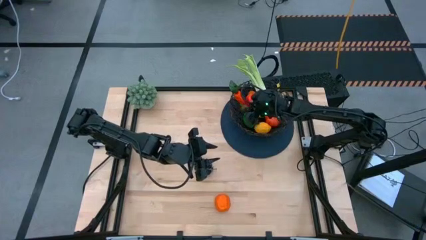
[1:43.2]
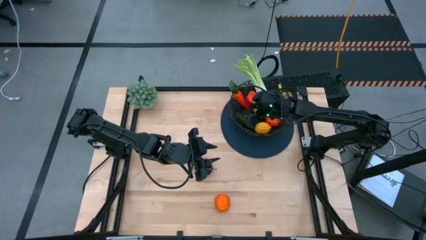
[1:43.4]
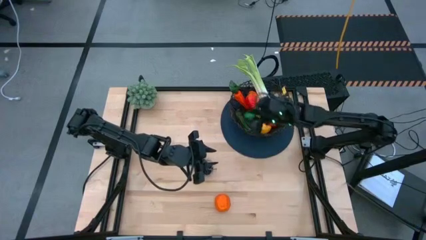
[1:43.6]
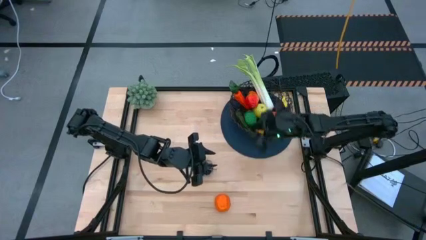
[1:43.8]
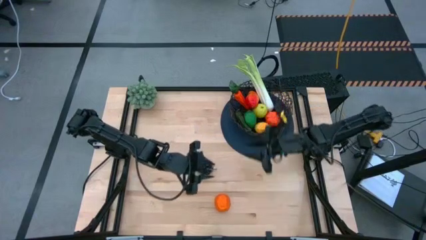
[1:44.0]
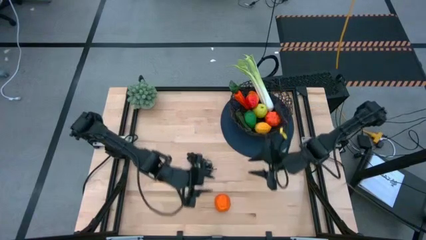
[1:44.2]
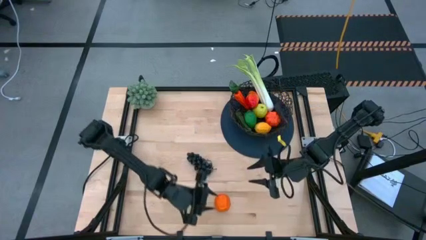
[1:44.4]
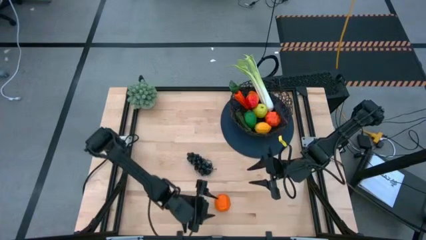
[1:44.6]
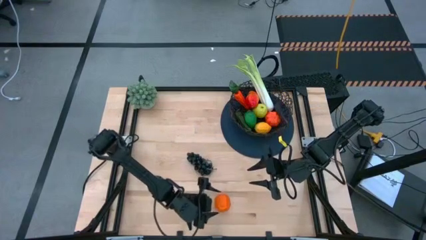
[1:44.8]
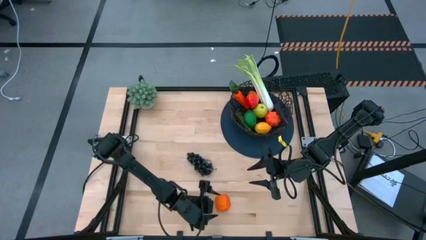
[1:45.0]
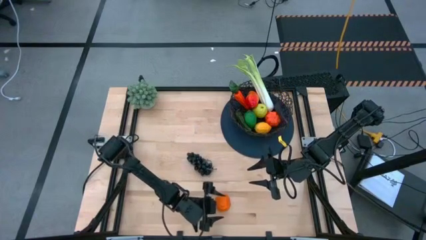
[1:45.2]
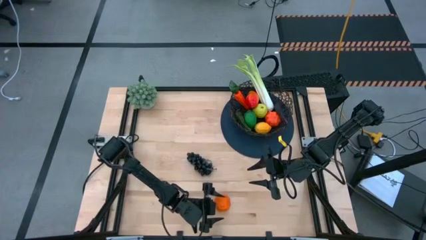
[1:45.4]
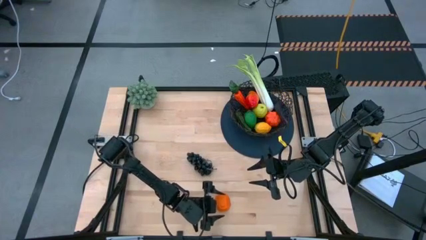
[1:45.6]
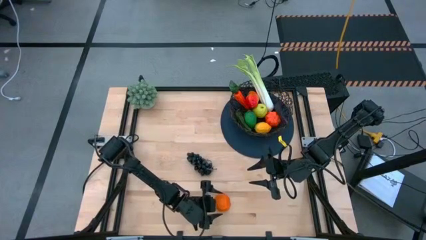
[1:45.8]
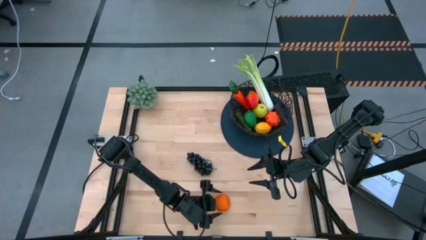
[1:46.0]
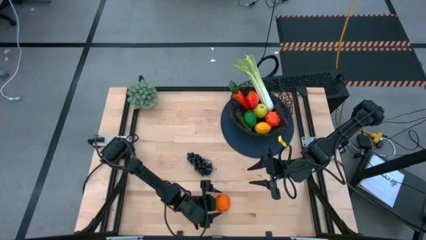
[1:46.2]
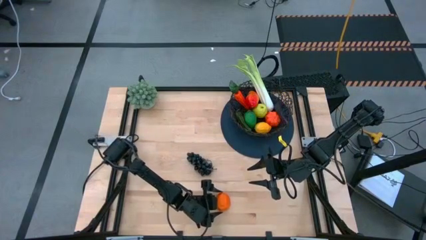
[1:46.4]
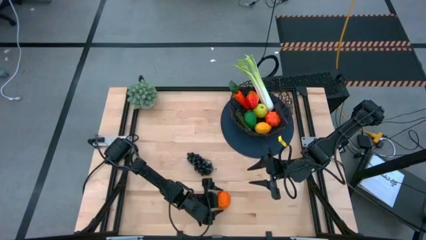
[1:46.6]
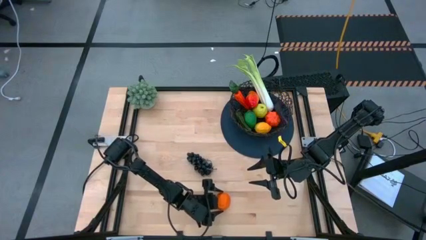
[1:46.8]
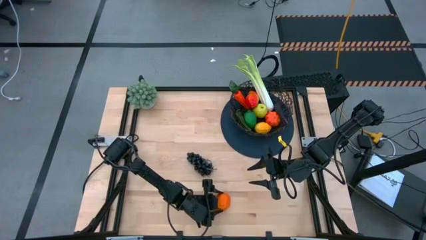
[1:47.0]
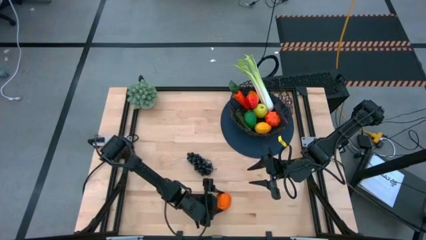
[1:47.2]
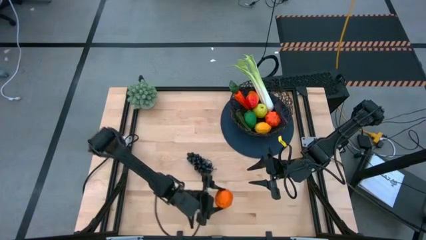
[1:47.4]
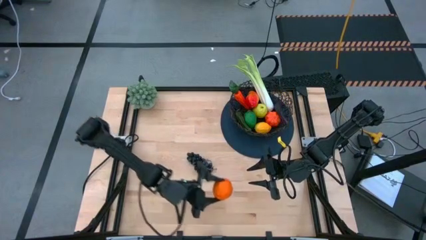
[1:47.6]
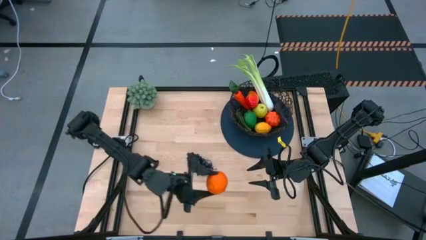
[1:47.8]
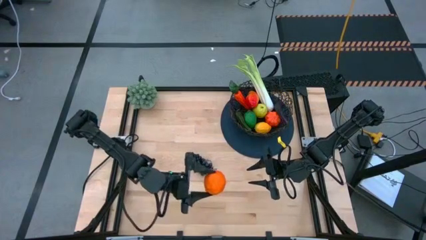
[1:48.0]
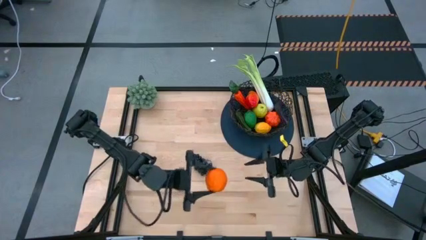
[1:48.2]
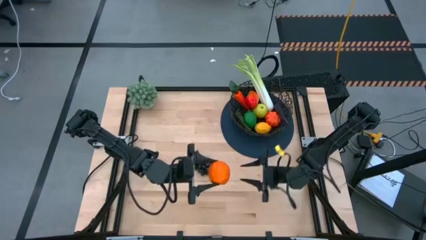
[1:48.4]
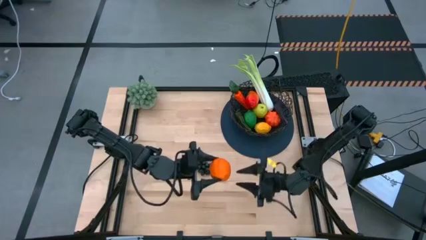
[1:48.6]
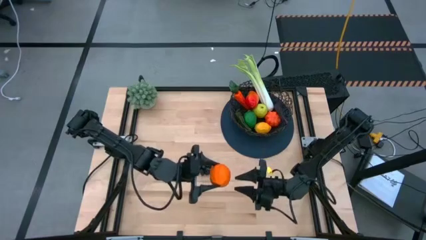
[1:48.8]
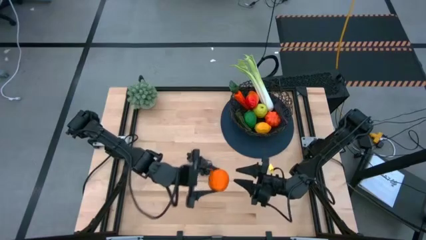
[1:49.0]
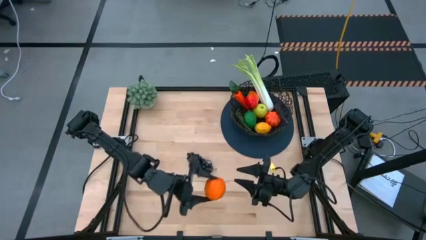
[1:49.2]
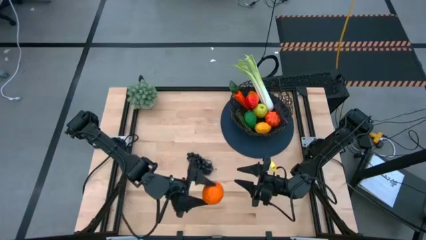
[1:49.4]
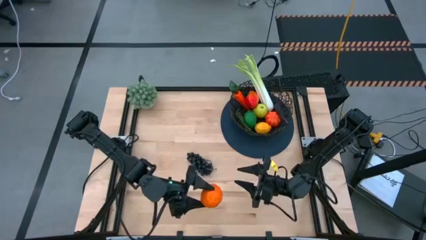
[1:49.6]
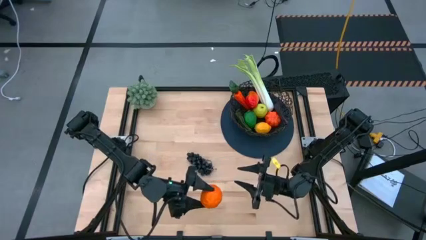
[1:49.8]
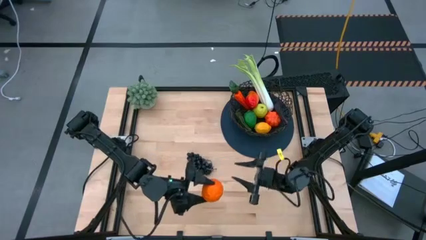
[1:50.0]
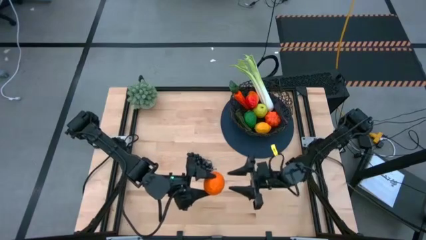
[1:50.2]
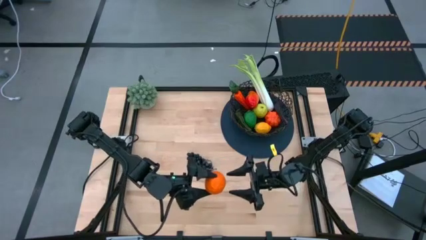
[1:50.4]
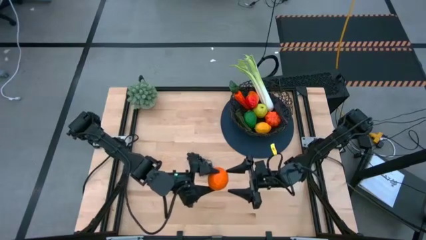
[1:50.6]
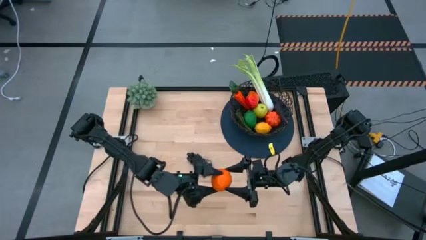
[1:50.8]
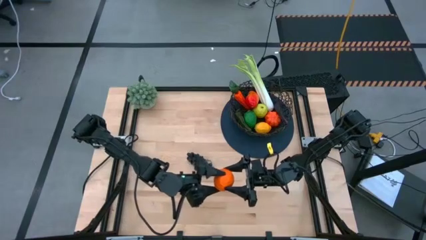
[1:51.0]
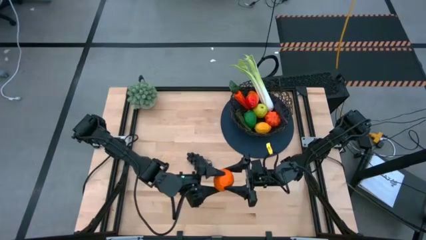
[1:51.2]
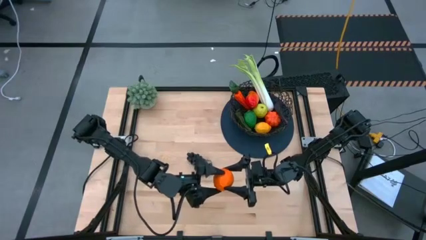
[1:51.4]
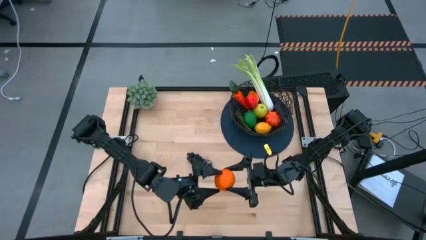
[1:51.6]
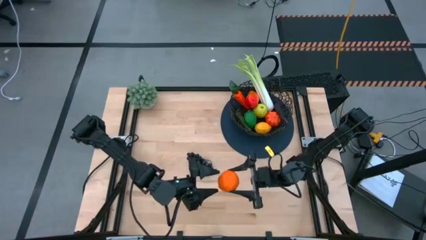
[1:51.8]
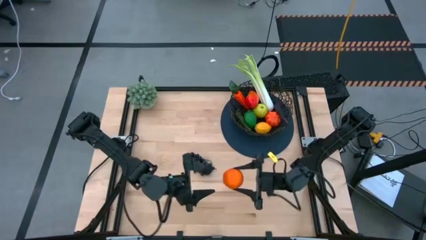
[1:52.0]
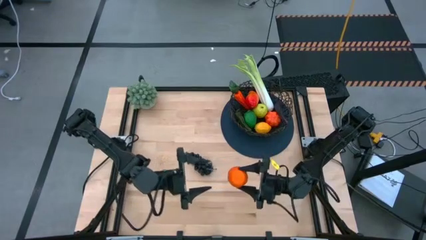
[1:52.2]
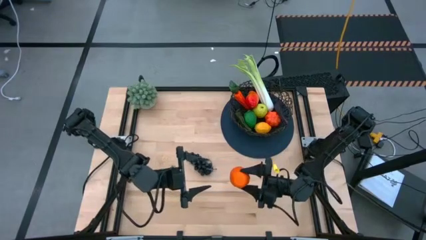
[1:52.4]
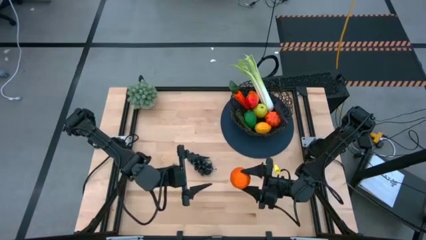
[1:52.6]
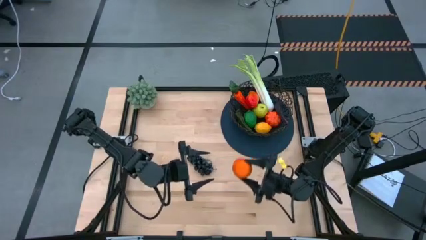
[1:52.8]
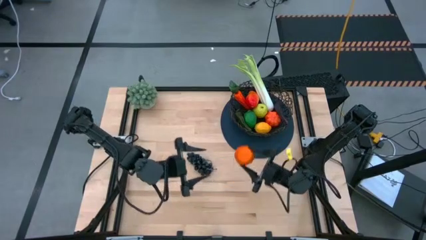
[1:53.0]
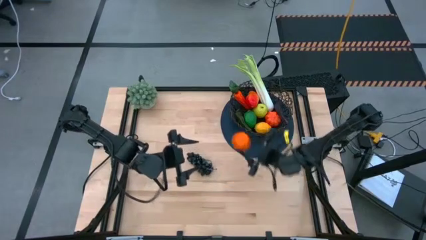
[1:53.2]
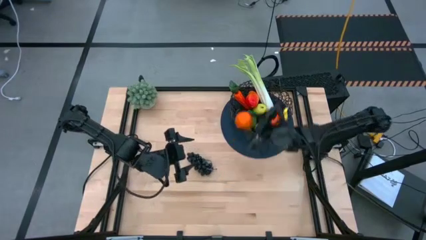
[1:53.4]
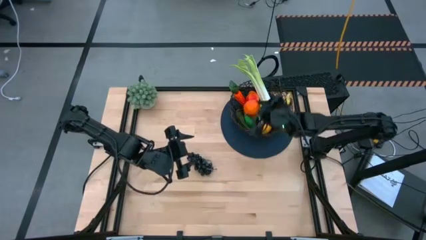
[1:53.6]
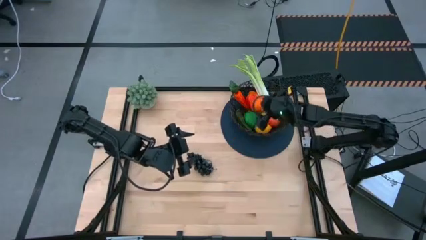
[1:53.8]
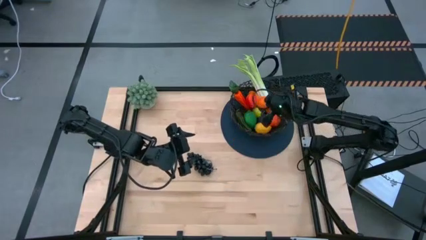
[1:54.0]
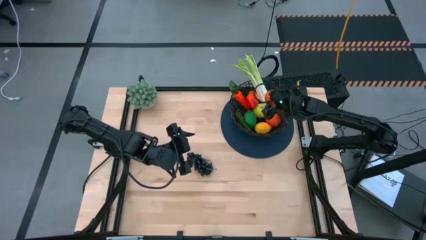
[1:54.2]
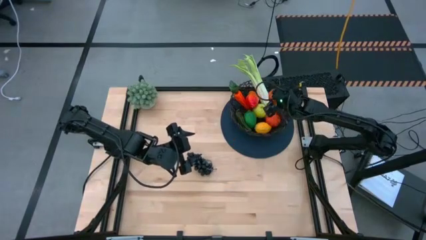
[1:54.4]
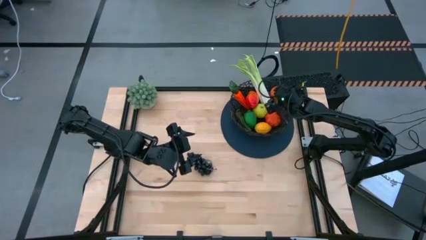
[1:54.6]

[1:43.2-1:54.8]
Task: Build produce basket
Put the orange into the black wire basket
